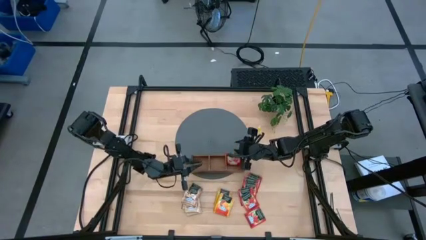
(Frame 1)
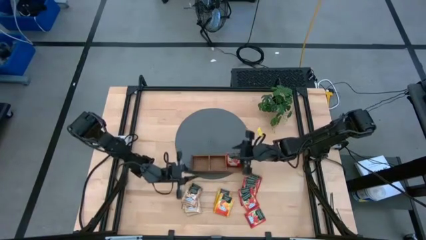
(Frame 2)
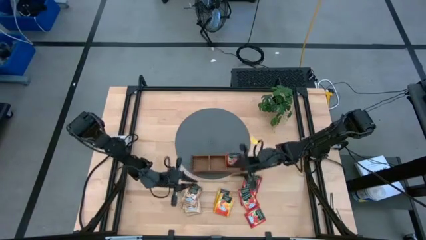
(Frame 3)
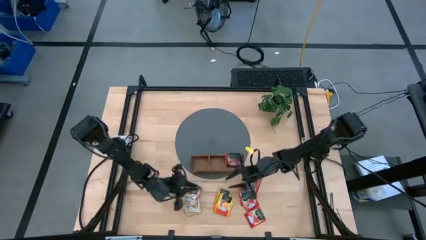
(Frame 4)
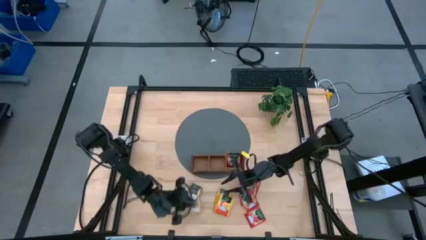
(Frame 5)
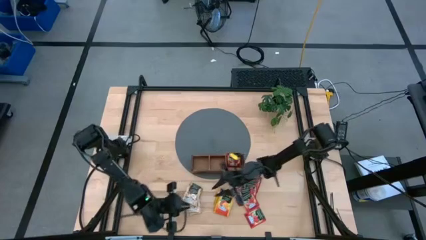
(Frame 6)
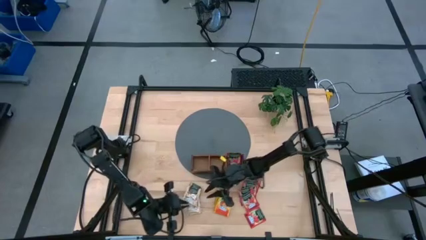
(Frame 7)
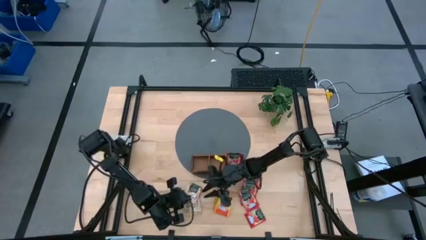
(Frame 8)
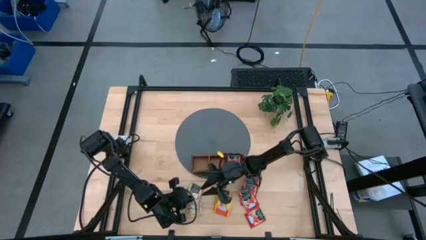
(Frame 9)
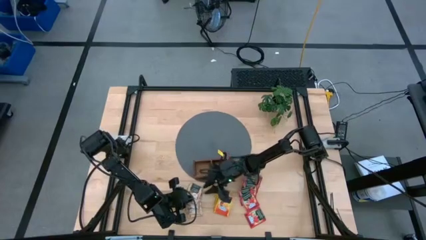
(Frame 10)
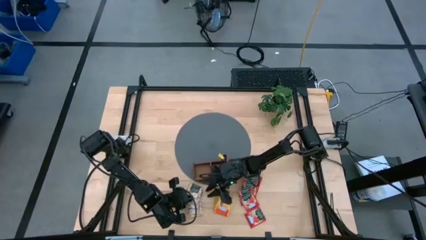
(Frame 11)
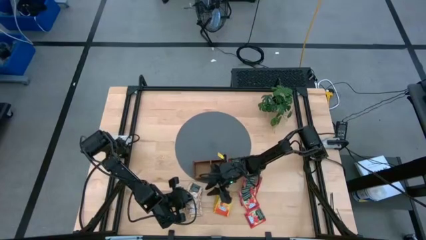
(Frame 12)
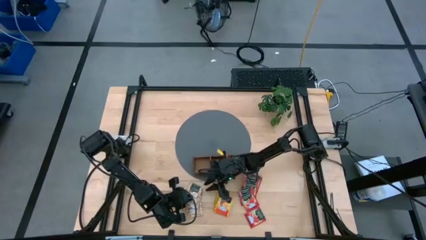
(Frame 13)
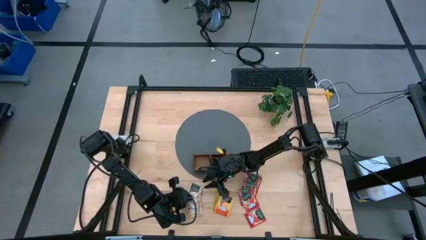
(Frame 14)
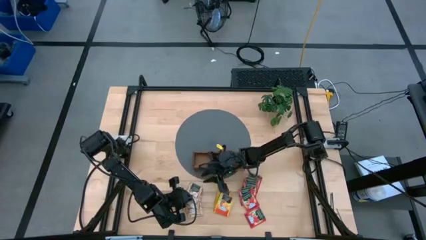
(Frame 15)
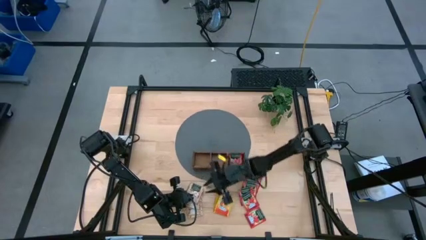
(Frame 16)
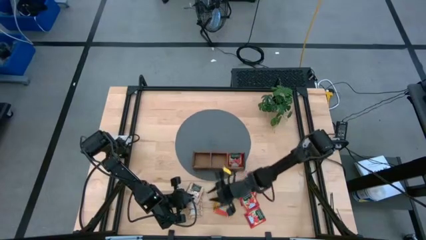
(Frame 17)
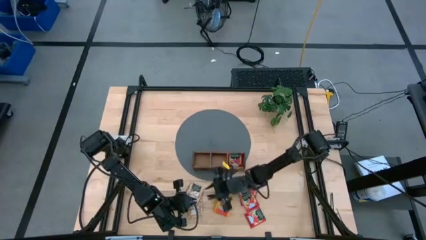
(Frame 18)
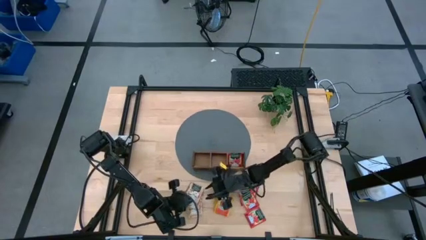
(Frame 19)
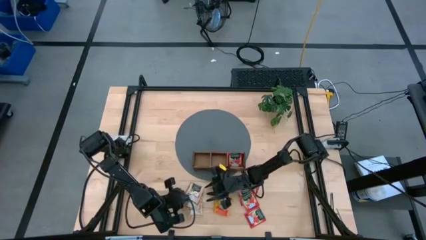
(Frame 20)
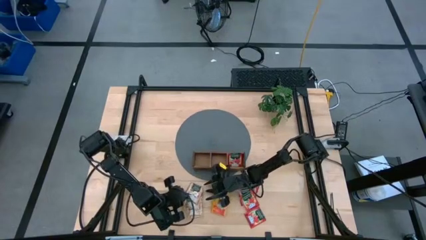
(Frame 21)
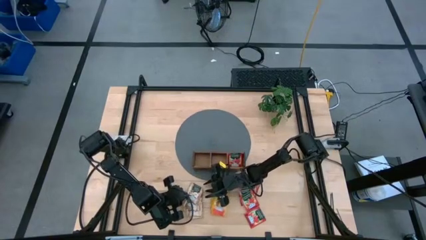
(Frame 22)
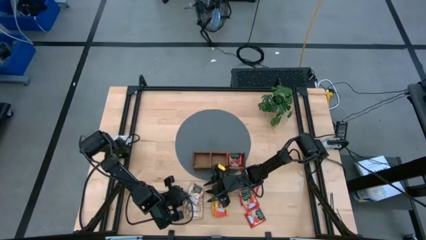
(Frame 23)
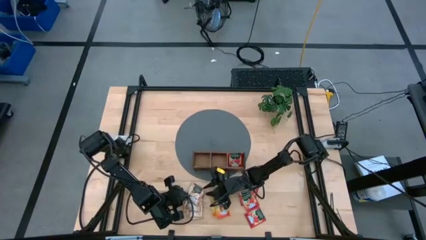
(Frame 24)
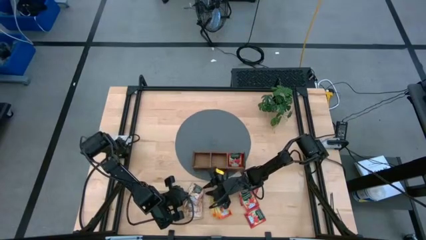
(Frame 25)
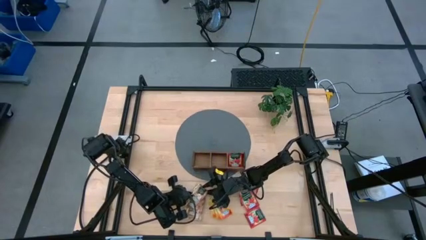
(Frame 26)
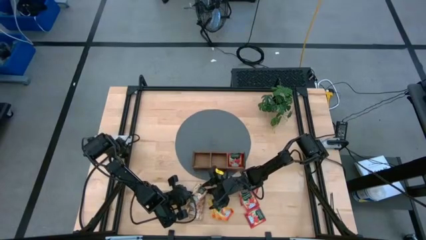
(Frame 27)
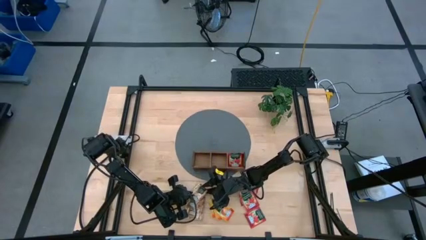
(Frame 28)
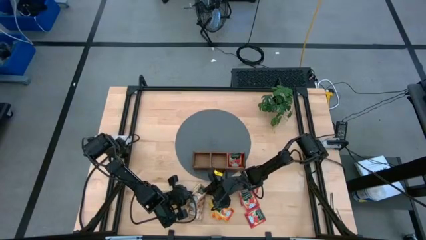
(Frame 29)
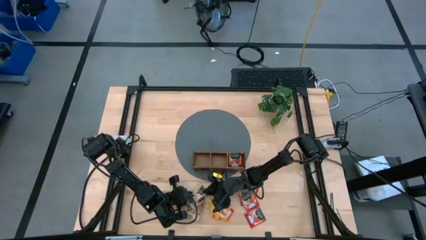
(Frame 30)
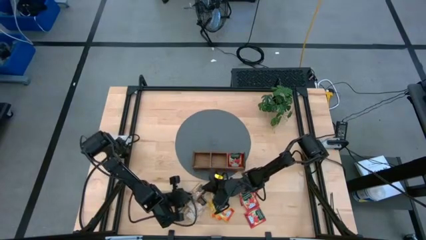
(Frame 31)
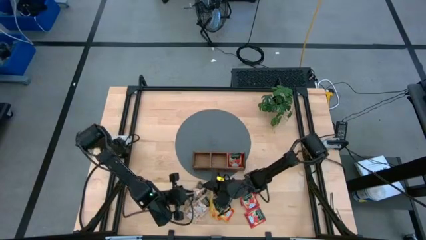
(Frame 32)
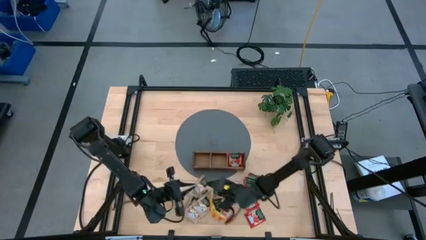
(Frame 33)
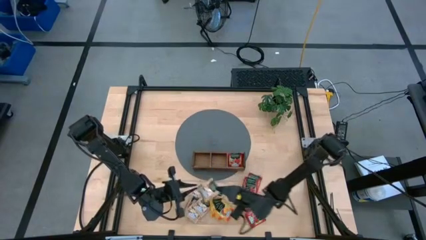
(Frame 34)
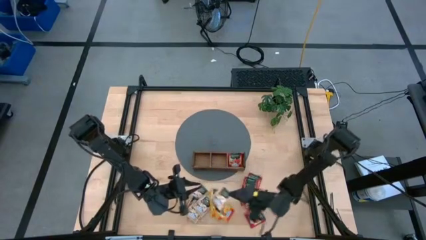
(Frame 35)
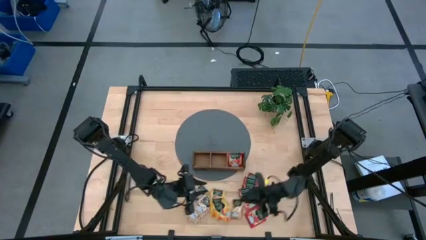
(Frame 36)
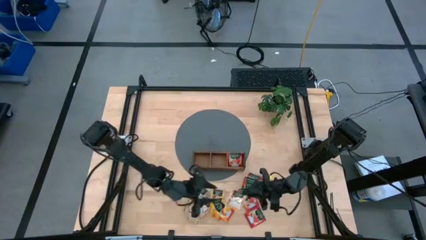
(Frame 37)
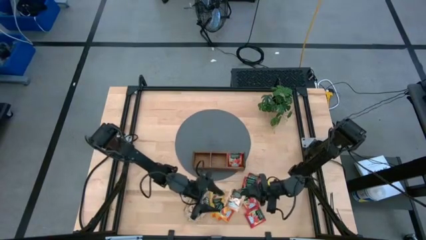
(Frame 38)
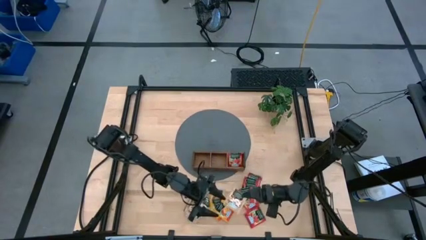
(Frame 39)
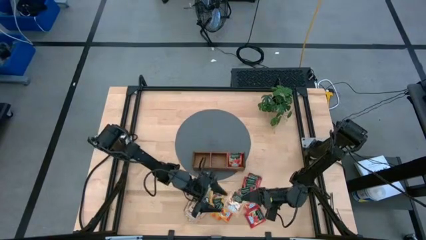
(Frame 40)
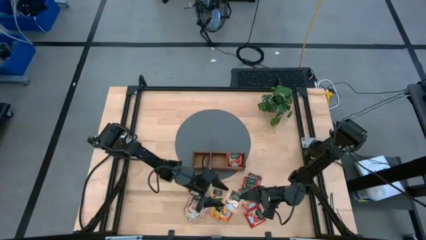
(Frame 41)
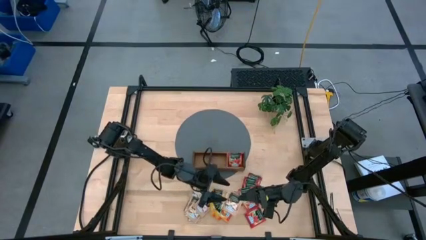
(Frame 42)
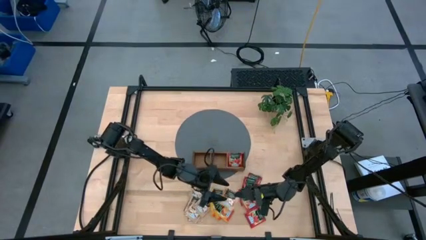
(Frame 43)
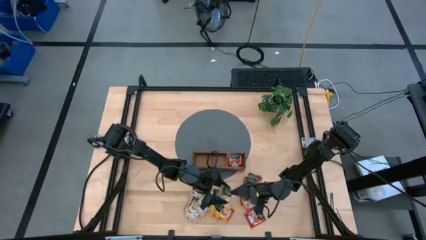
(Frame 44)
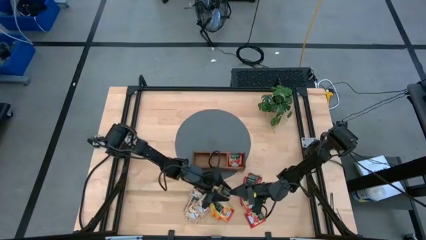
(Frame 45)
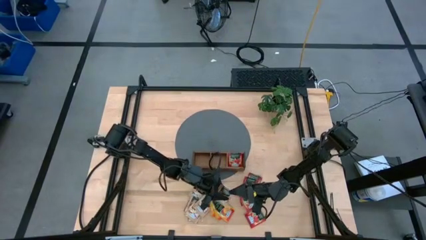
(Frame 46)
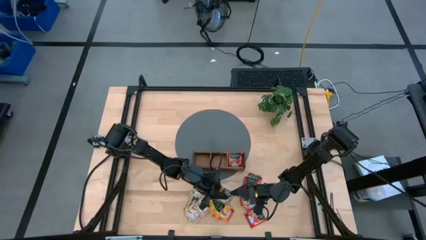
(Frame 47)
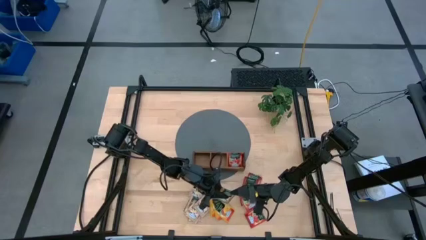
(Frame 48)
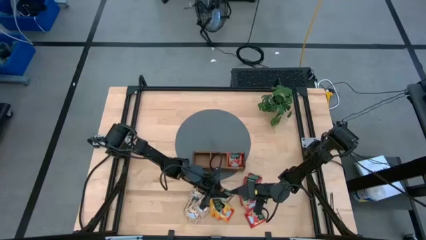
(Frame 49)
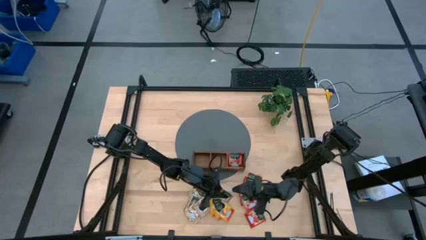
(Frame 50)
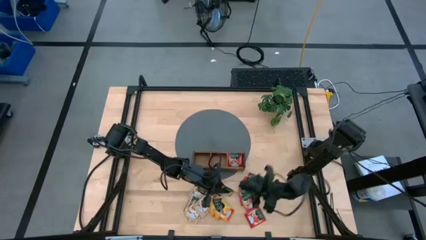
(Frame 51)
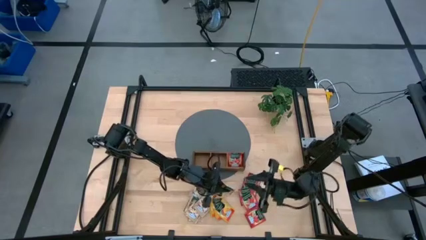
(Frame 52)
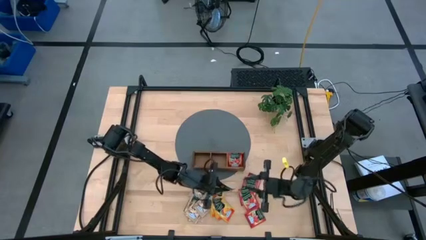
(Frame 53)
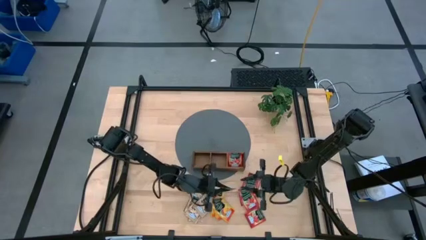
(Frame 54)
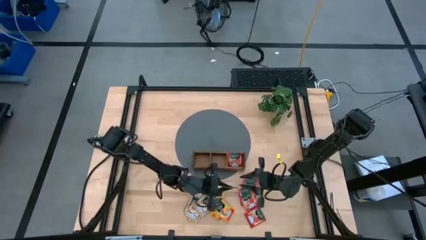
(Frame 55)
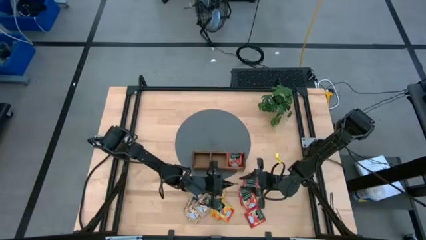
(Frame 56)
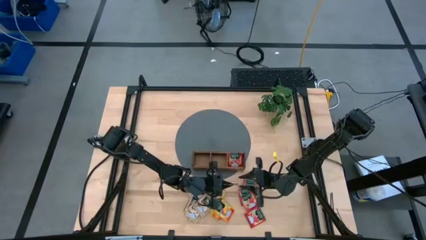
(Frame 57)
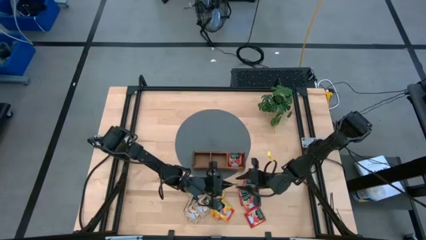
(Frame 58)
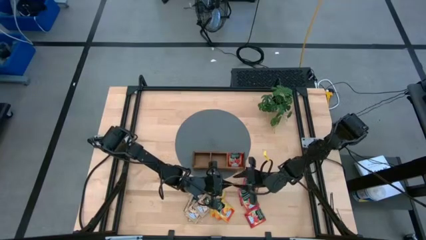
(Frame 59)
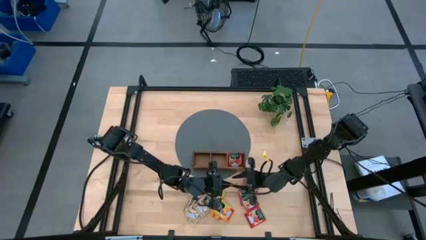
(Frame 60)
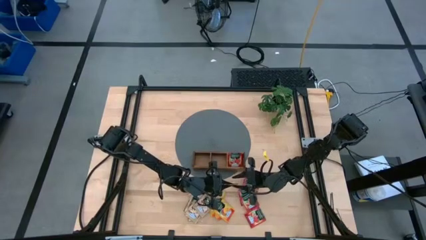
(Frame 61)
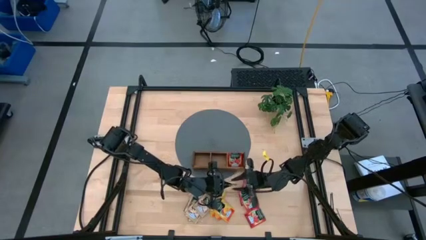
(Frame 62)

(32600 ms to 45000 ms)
Task: Pick & Place Tea
Put the brown tea bag into the left section of the wooden organizer

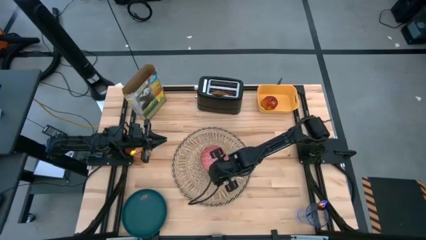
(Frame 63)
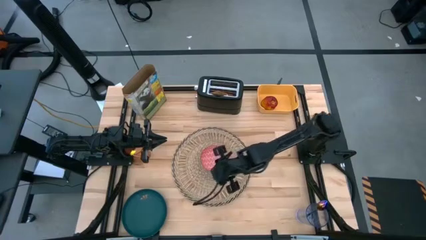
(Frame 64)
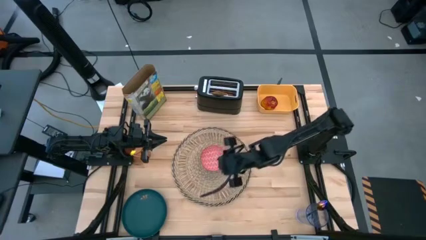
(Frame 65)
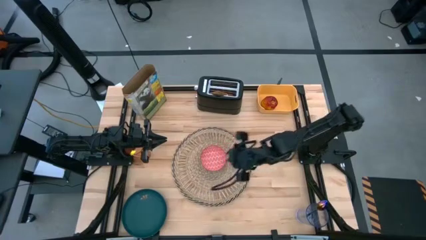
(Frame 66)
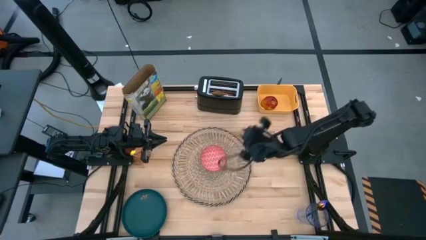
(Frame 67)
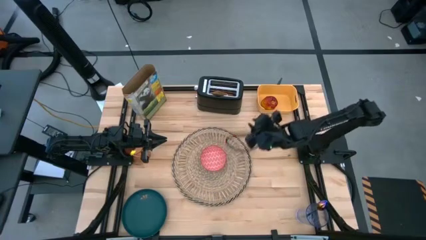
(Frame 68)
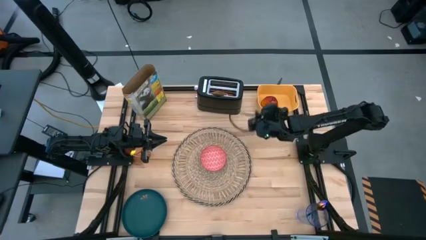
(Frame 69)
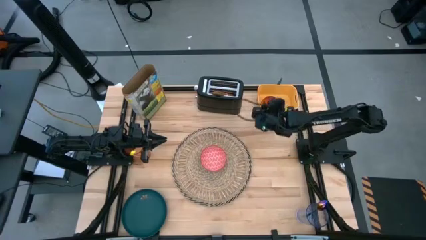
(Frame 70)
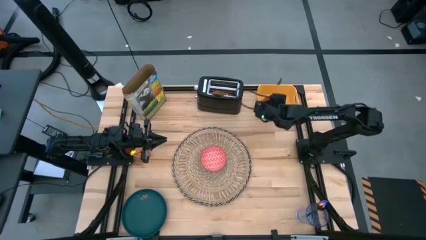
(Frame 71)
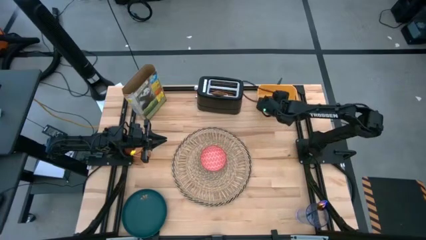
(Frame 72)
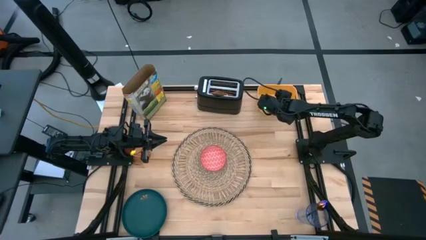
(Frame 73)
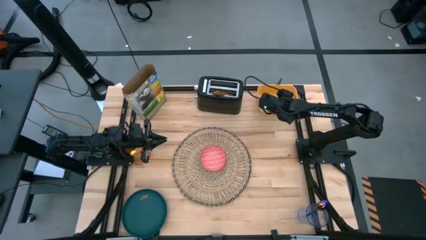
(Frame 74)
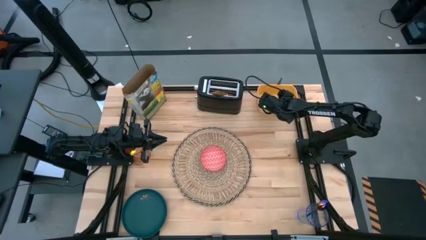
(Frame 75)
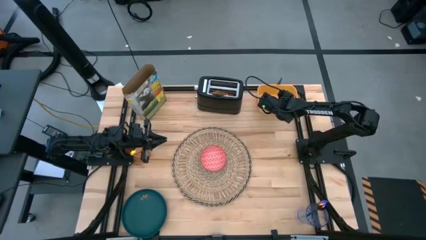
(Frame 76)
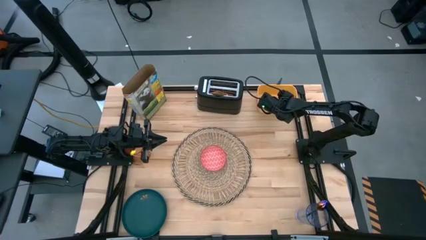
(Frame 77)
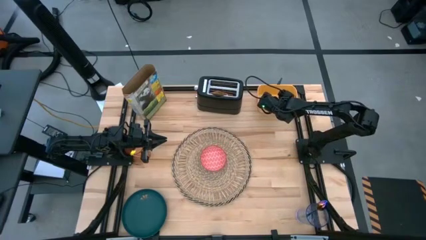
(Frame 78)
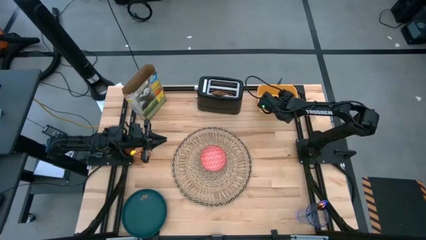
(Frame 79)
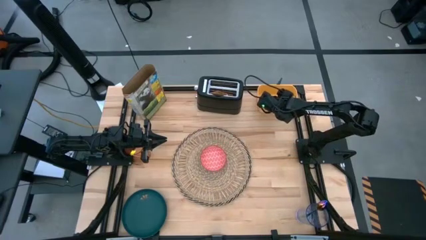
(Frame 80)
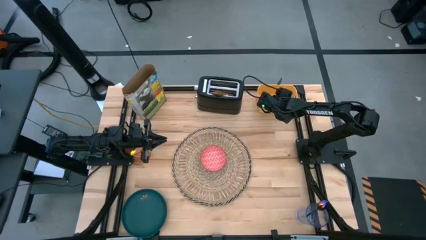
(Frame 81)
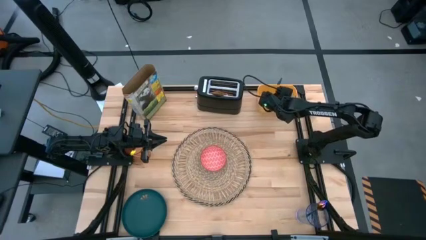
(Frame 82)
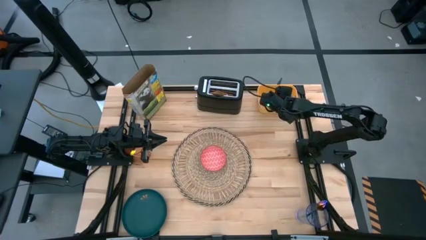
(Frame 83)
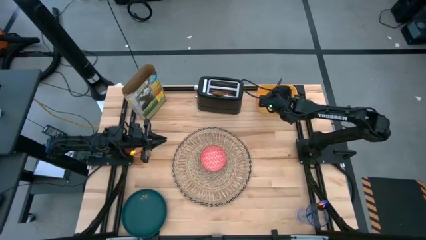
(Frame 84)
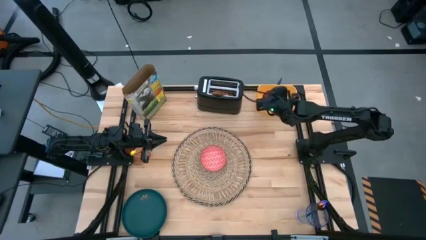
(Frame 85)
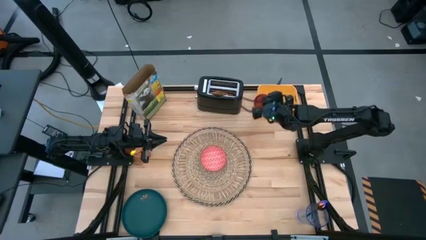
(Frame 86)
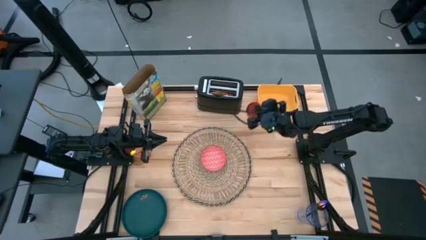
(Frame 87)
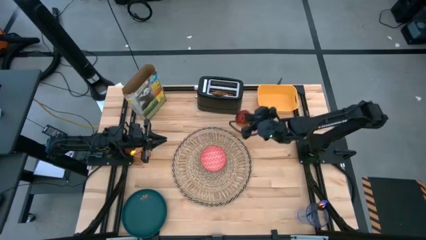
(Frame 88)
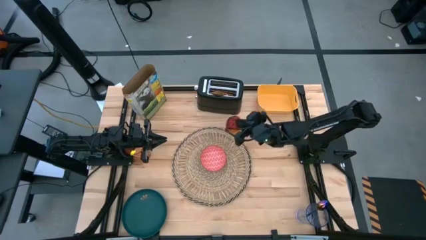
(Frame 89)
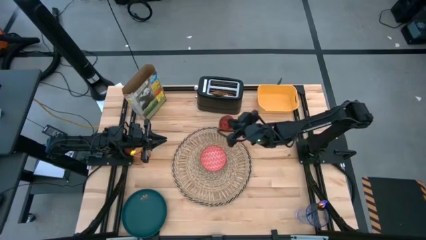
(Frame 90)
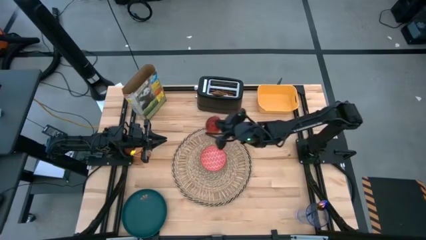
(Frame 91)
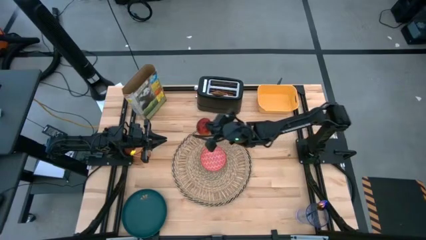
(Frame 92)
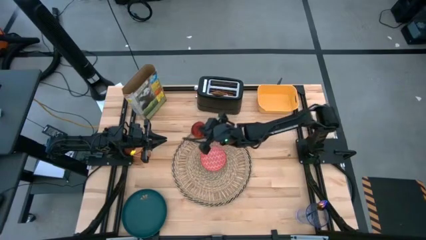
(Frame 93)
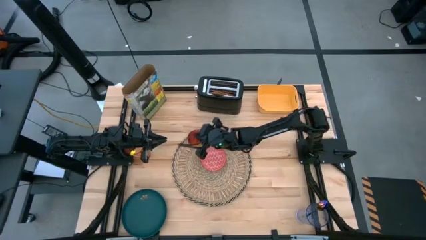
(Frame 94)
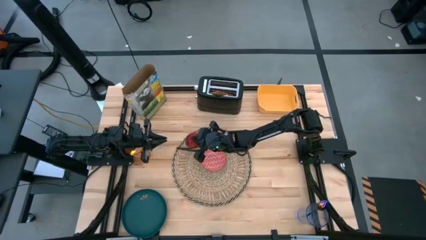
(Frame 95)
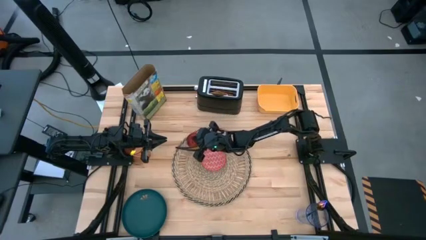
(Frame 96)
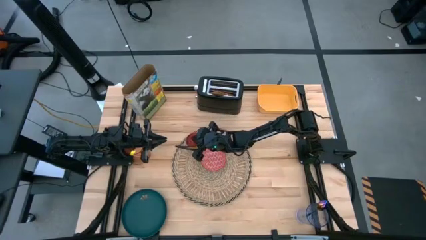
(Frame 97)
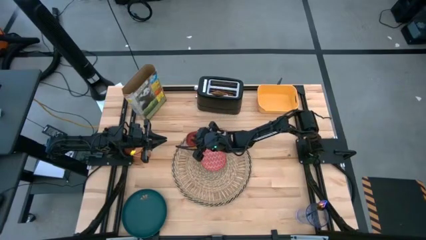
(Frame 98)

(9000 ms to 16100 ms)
Task: Arrange a breakfast setting
Put the apple on the brown placemat at the top left of the red patterned bowl
